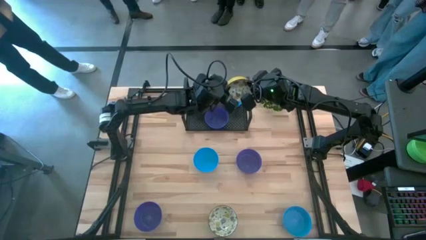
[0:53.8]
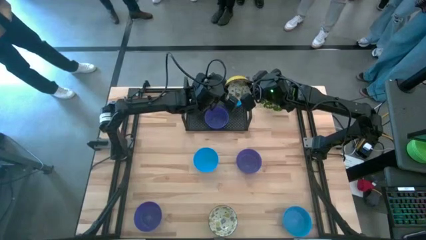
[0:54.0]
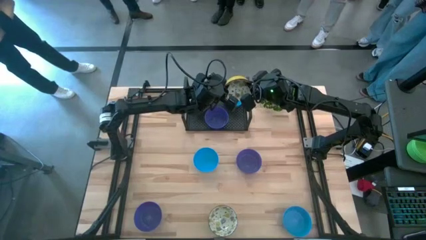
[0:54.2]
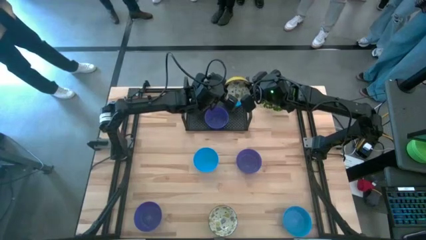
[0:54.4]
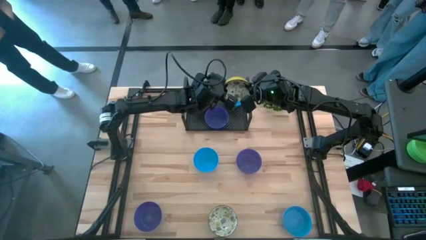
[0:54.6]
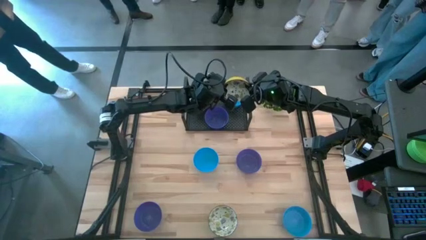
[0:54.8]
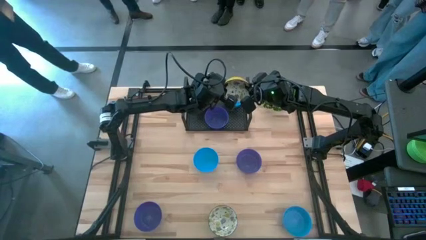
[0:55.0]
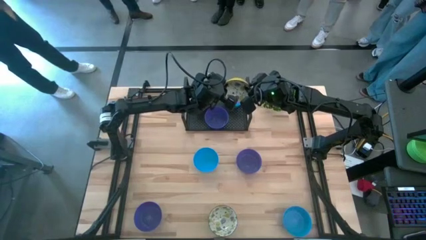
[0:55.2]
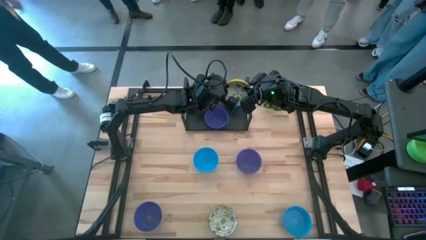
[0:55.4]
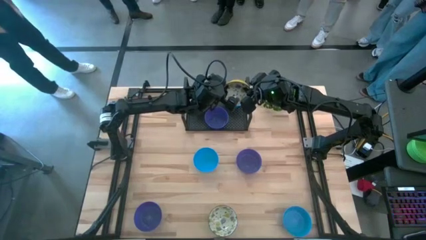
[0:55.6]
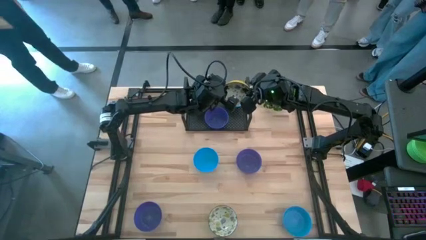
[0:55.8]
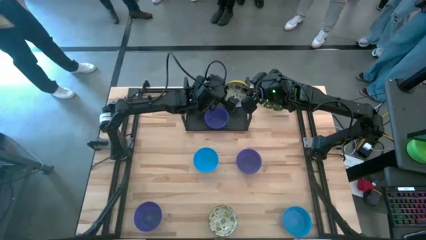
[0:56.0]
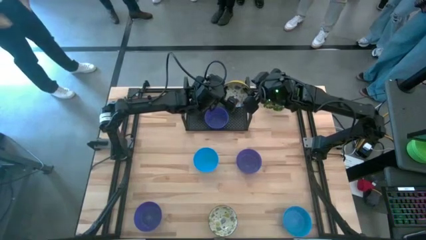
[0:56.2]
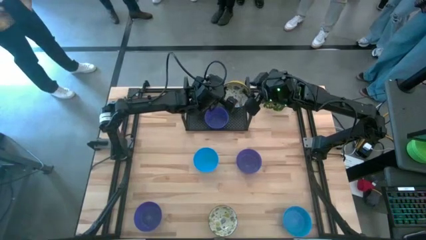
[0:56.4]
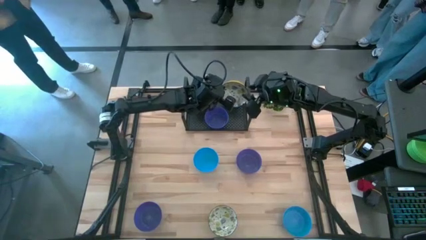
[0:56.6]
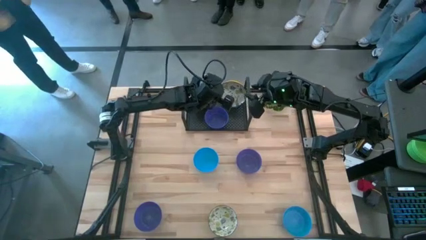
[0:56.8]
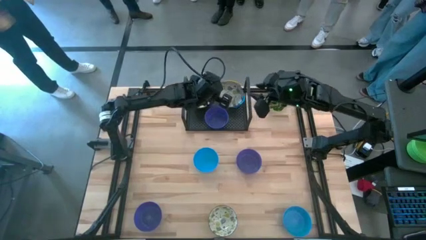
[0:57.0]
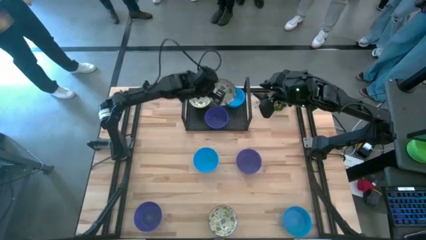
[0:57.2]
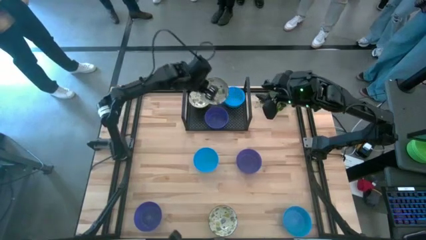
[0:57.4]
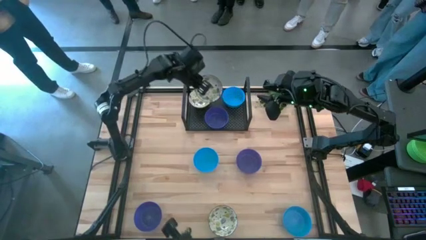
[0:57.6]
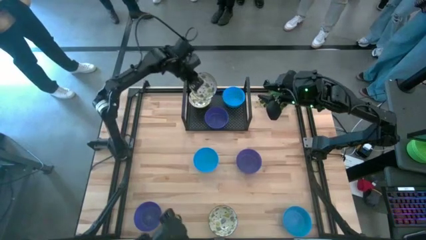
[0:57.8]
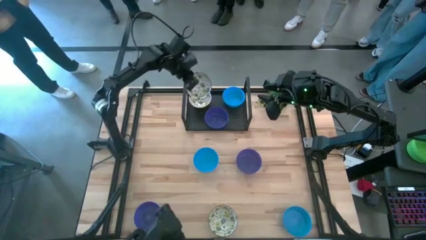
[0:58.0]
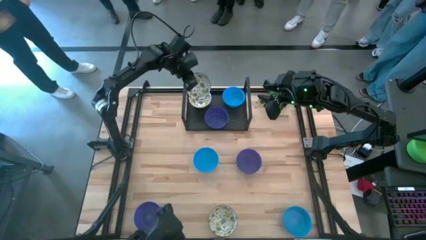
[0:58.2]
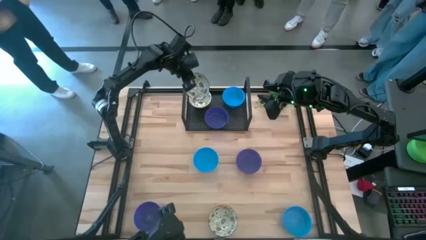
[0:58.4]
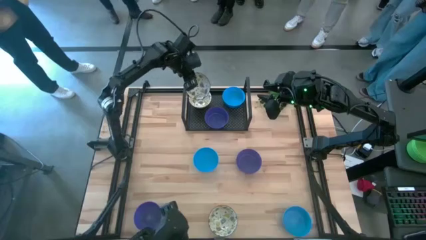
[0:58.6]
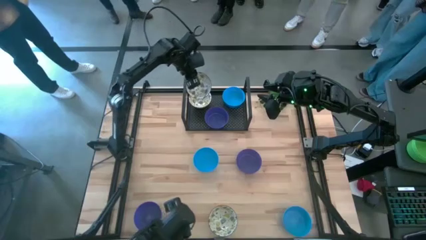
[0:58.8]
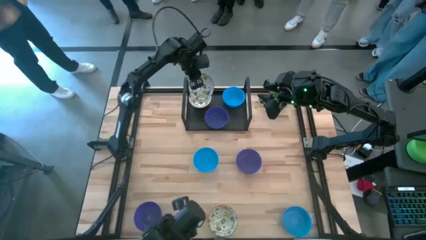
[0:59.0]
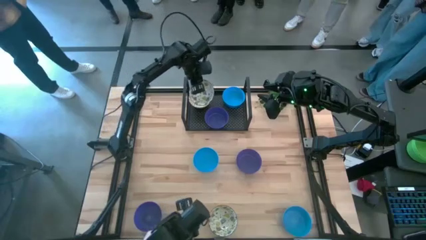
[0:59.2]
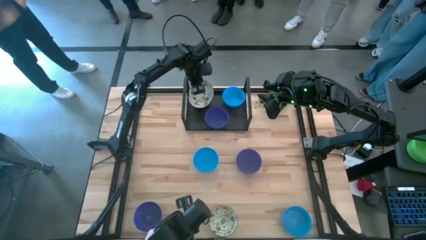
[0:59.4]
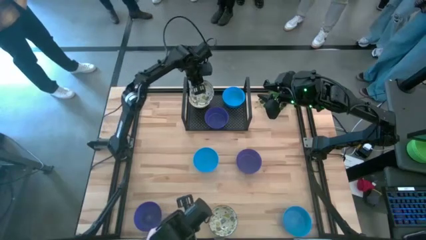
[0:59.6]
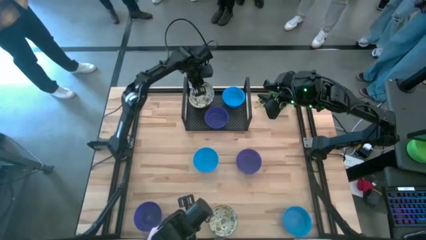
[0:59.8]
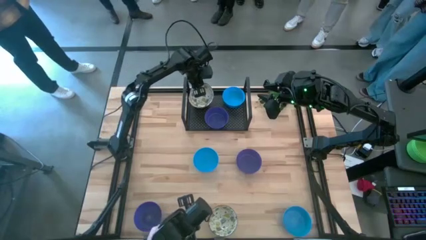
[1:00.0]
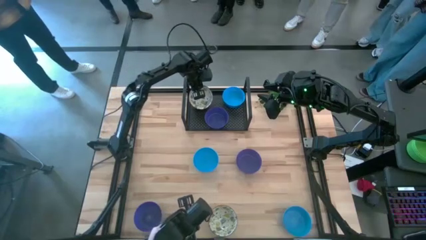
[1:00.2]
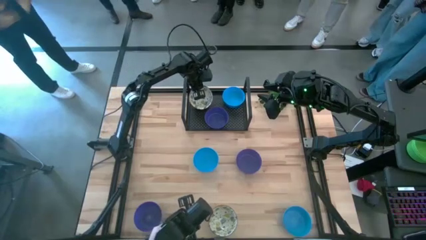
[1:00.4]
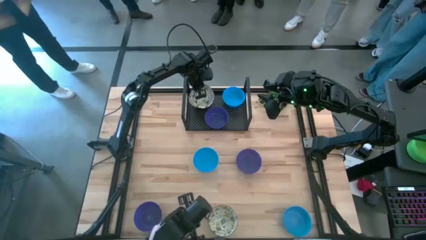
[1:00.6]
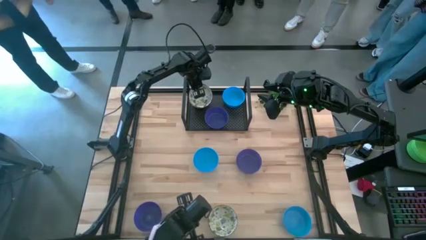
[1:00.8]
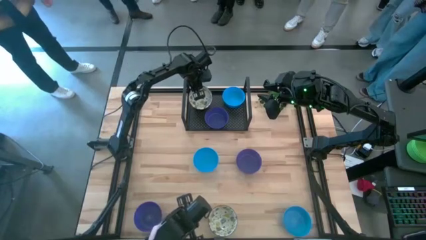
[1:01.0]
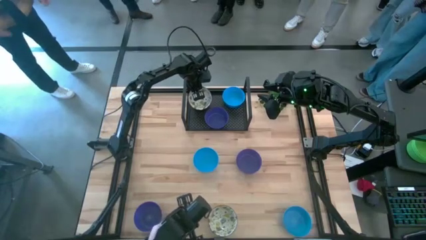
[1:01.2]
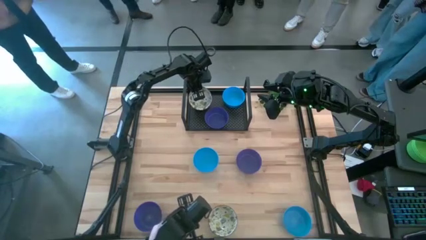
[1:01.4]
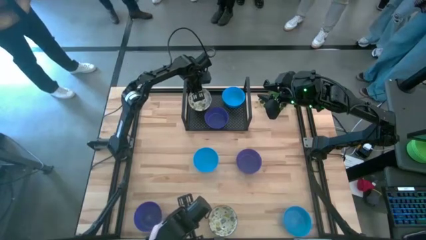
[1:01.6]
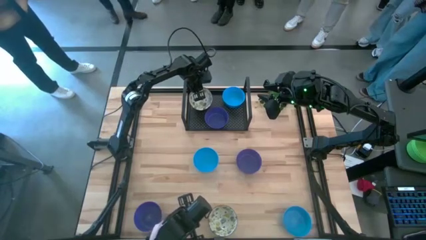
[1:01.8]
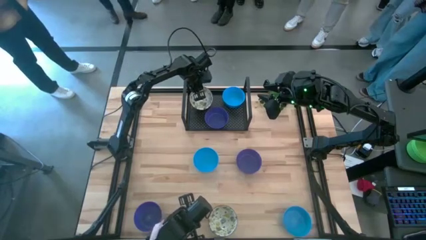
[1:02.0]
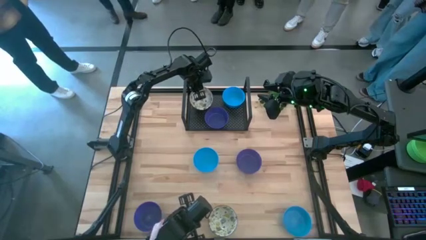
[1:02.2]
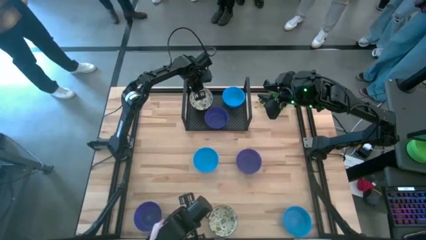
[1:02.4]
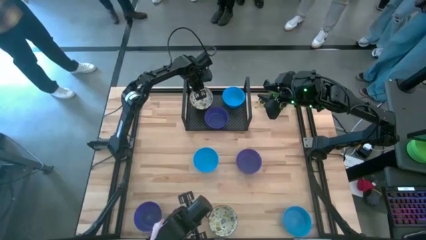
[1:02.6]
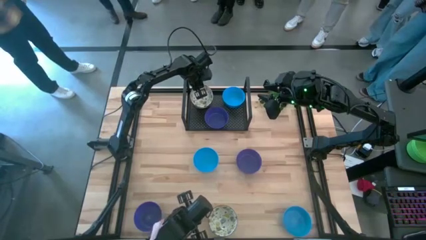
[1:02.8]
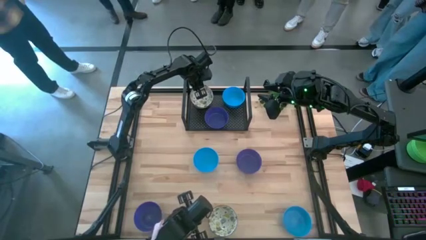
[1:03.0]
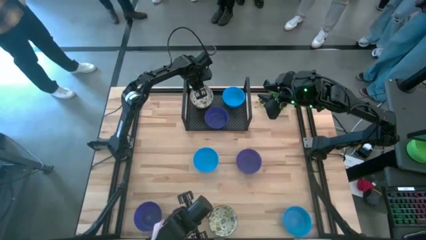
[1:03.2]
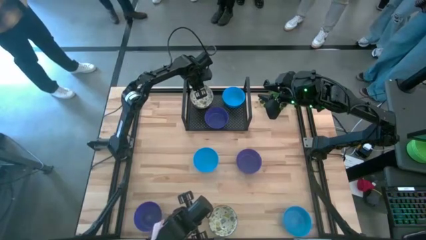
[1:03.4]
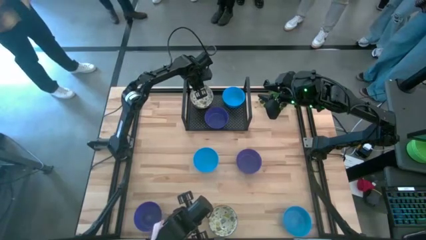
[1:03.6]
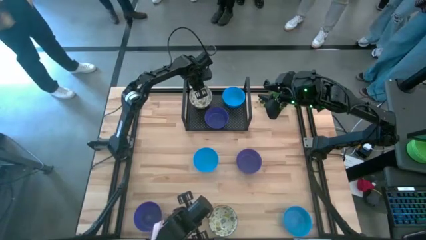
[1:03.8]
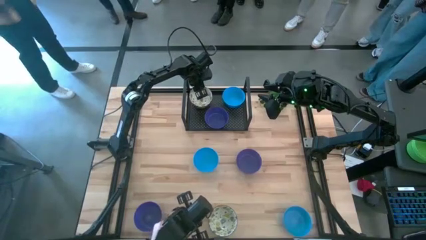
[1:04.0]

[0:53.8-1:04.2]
Task: Pick & Place Mini bowls
Stack the top white bowl on top of the white bowl on the shelf

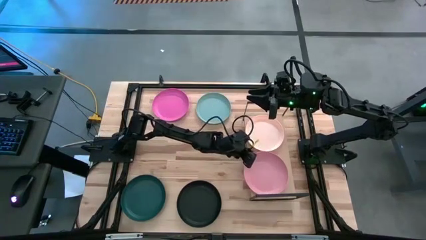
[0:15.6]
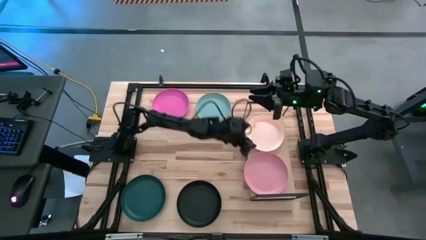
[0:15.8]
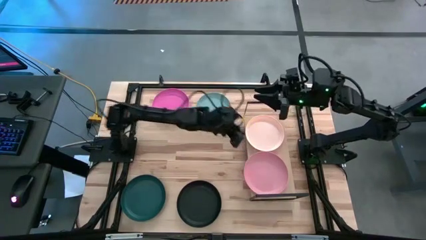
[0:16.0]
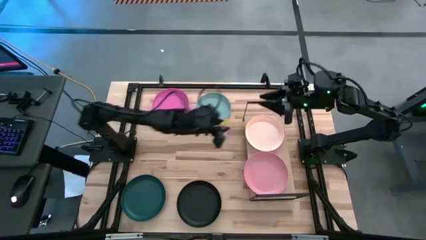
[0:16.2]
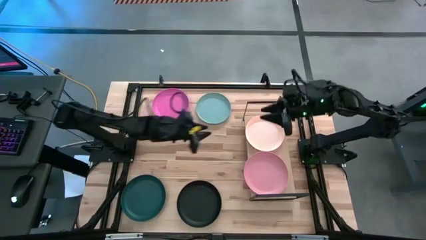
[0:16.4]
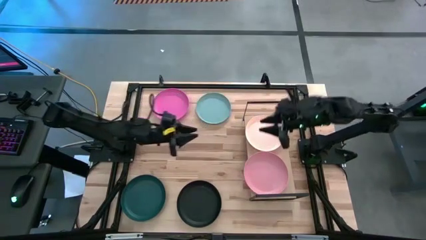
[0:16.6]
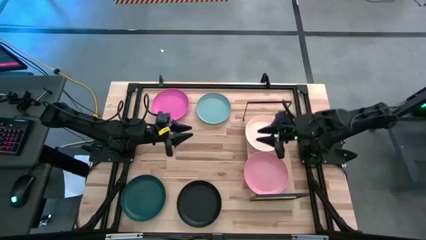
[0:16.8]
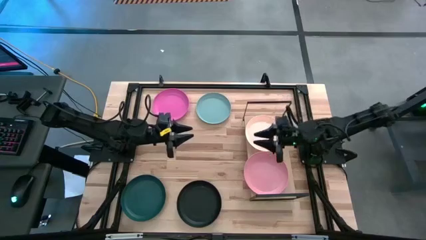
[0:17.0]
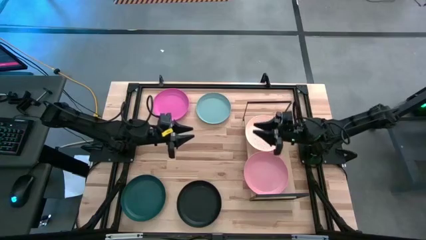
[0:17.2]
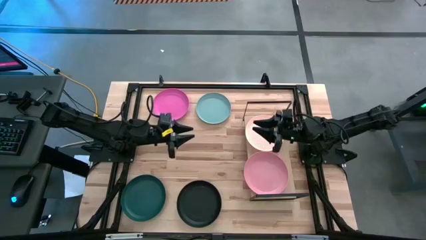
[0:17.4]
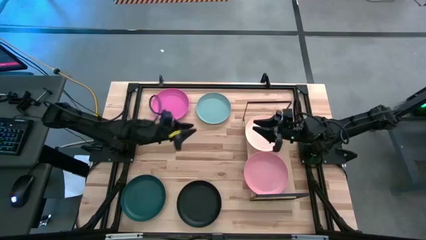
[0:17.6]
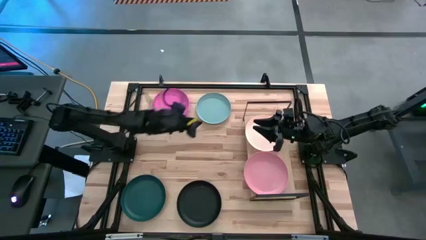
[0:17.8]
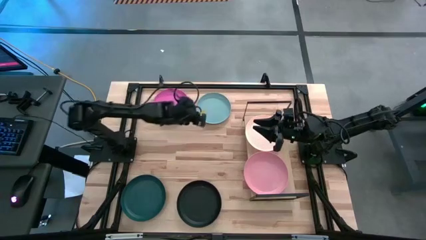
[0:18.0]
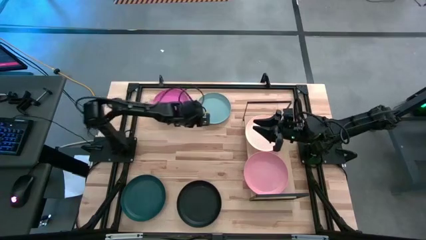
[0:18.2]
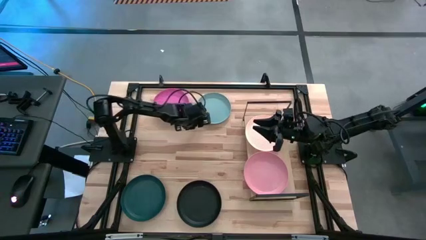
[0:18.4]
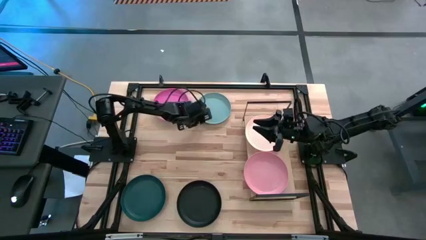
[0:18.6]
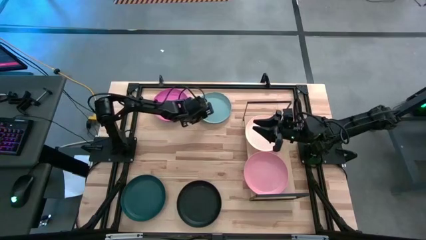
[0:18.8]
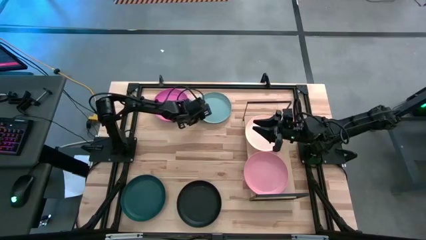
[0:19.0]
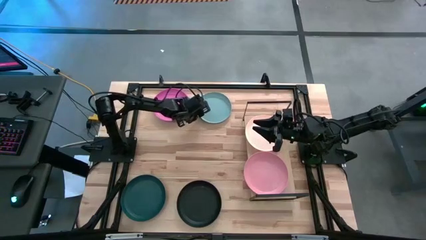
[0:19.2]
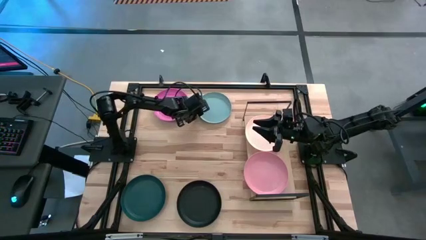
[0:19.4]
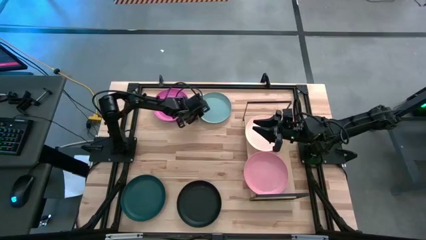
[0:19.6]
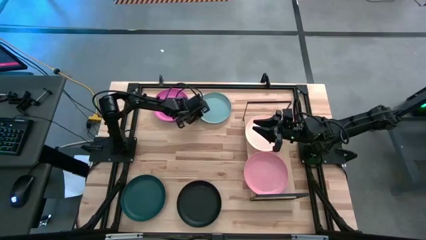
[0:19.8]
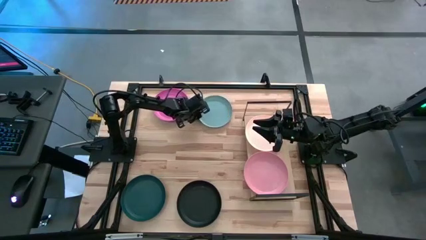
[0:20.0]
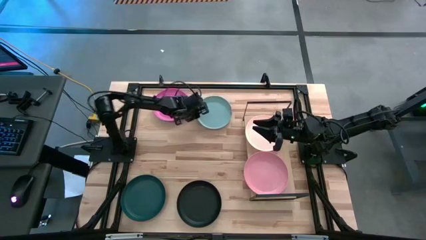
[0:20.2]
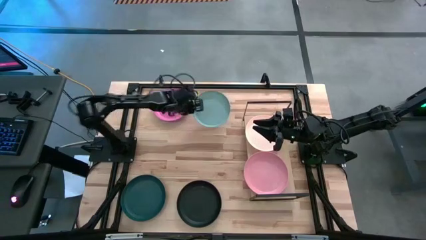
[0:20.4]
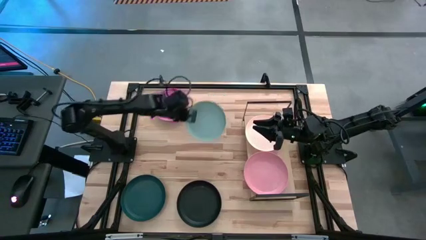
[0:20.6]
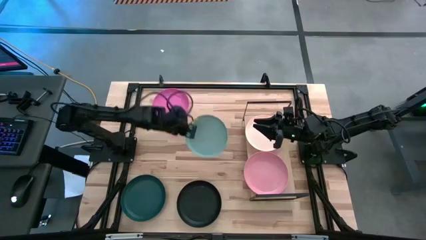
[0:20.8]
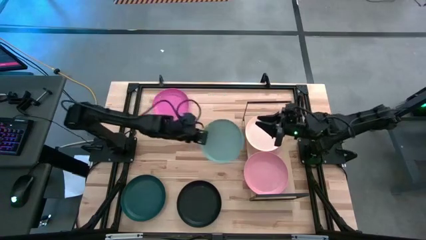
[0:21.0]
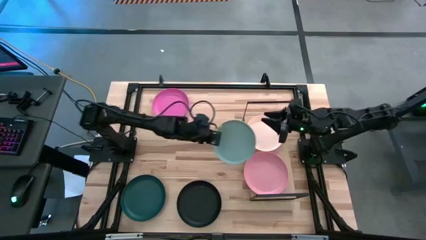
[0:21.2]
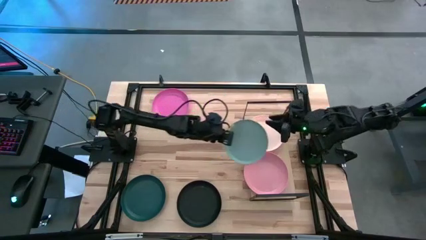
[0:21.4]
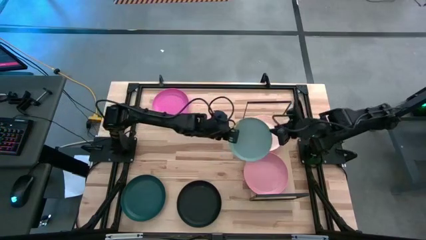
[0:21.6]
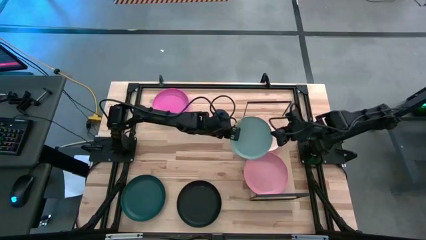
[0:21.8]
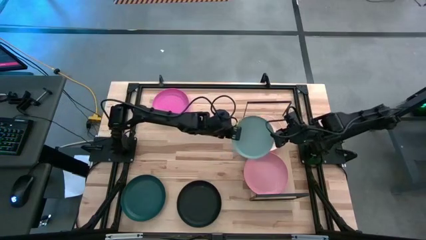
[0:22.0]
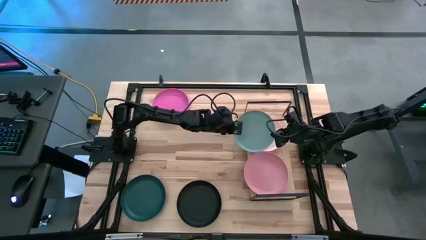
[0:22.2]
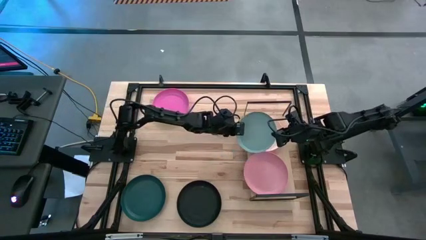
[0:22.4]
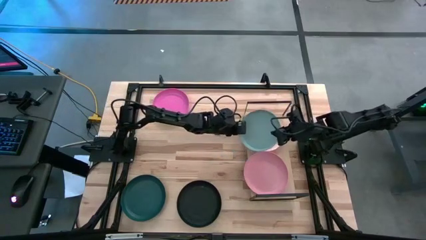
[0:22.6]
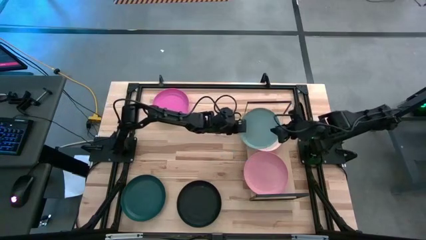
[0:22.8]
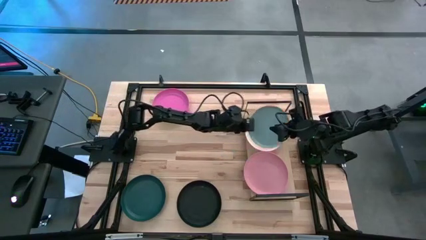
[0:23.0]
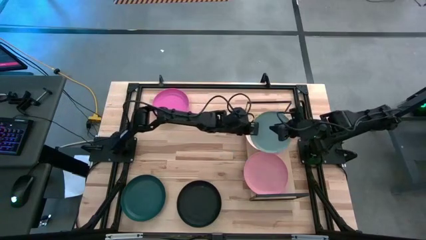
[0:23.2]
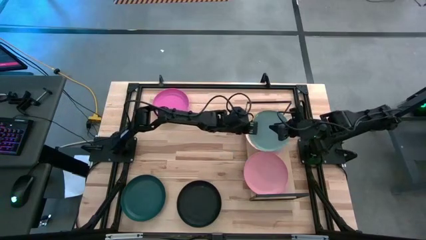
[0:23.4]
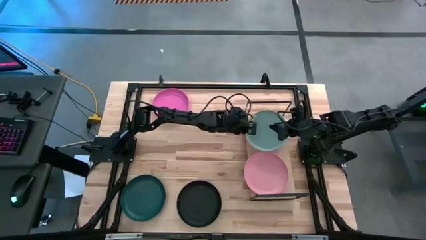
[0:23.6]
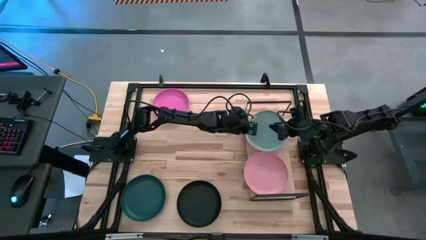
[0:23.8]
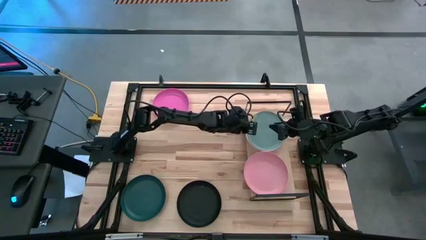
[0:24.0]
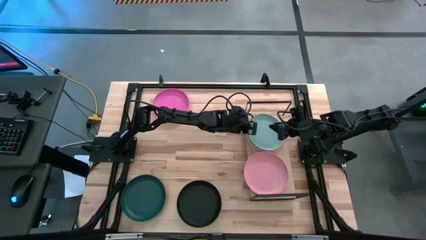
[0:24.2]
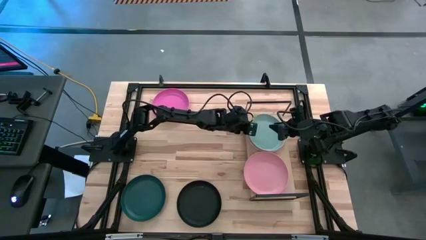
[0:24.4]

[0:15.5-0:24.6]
Task: Place and stack plates onto a shelf
Stack the light blue plate on top of the light orange plate on the shelf
